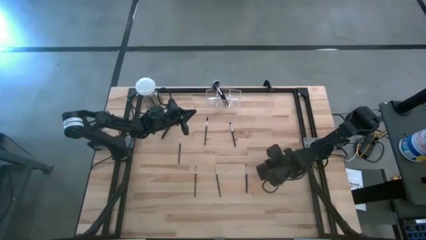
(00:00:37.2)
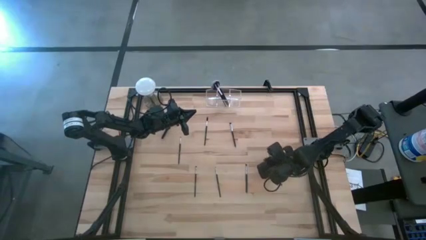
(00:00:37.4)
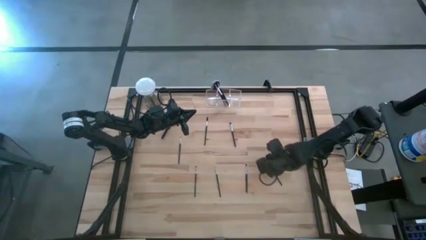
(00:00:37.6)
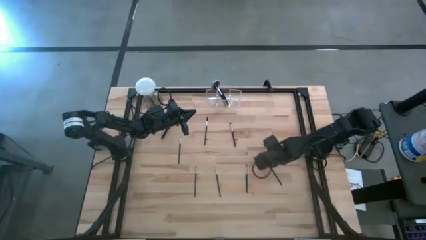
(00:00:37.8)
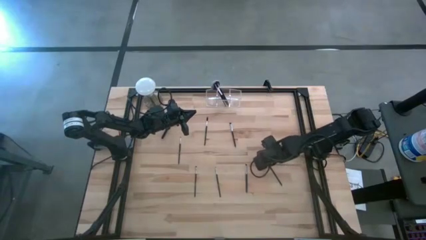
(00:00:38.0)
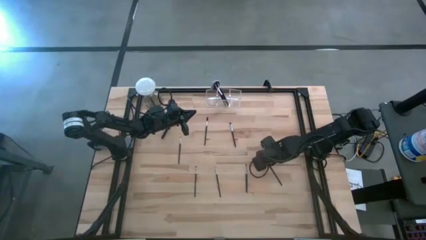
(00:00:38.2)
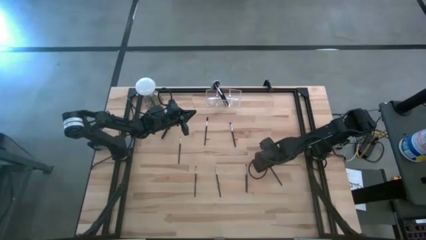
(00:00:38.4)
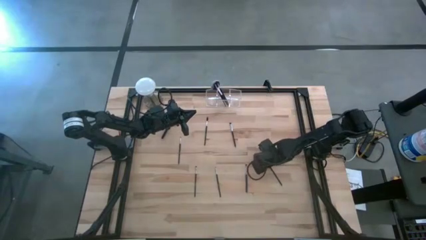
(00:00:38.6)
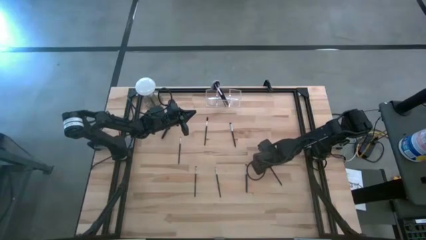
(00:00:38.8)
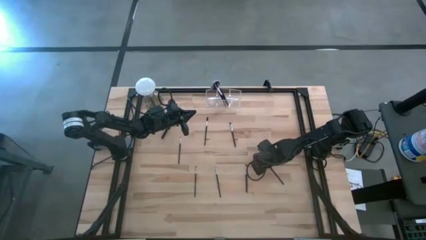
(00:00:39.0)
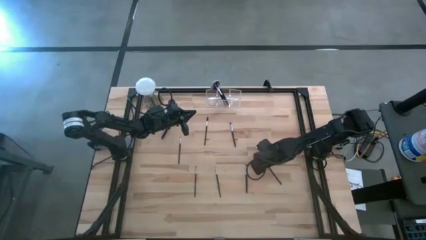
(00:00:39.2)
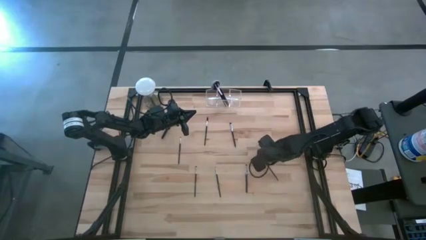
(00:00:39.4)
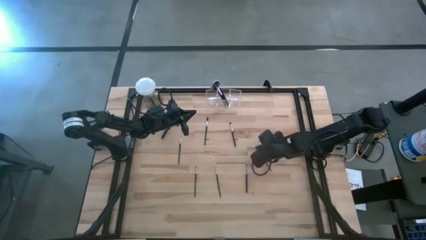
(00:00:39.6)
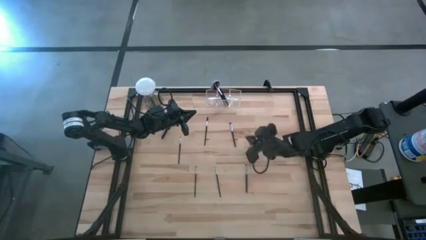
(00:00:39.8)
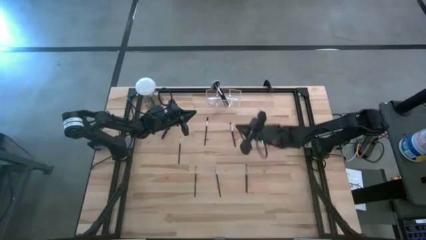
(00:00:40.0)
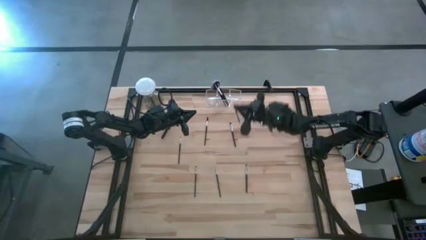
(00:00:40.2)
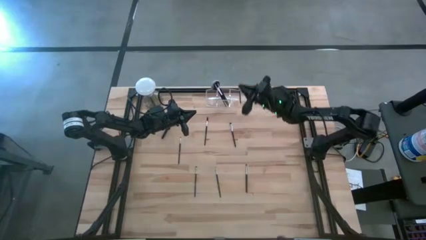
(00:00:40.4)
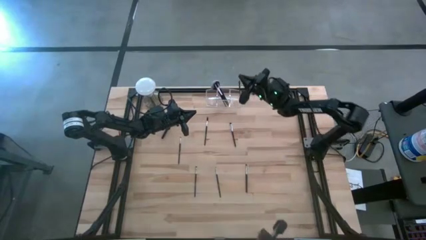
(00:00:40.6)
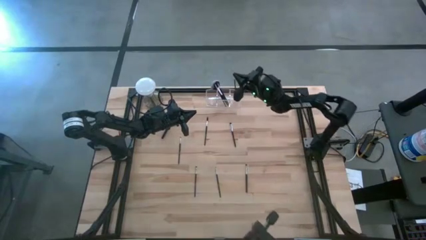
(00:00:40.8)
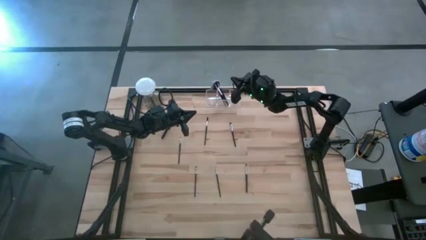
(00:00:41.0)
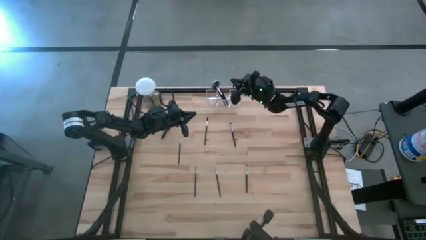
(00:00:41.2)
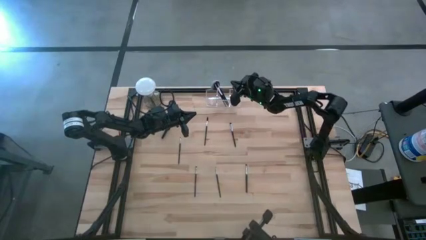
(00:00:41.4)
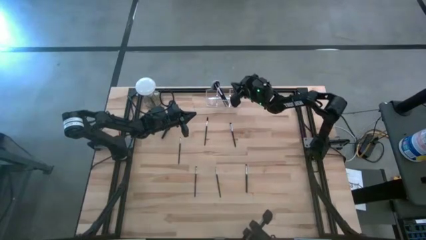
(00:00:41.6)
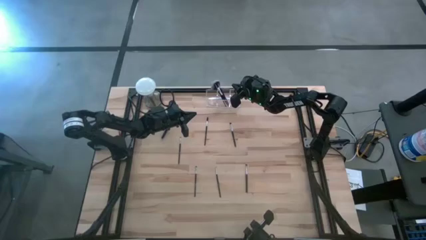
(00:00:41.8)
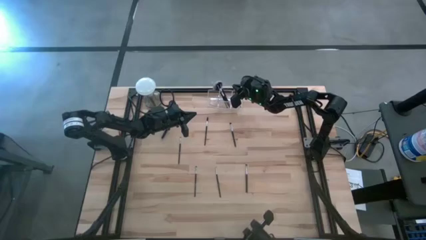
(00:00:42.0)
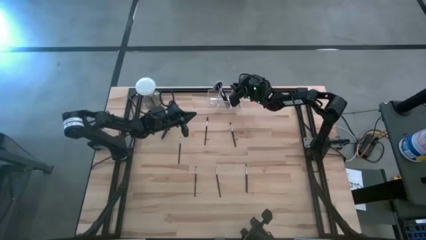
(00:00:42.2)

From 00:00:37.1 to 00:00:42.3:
Task: Pick & Place Makeup Brushes
Put the black eyeshadow brush into the transparent organizer

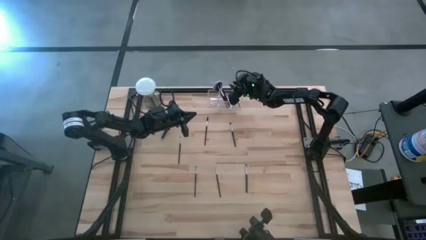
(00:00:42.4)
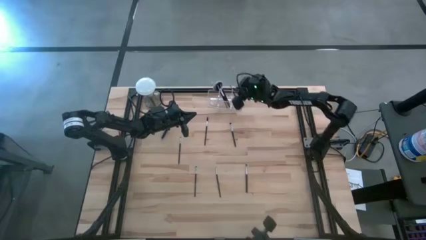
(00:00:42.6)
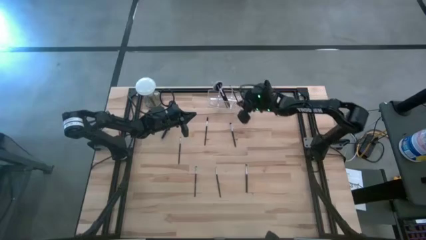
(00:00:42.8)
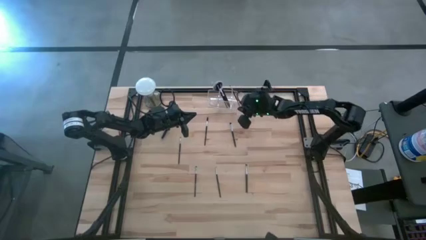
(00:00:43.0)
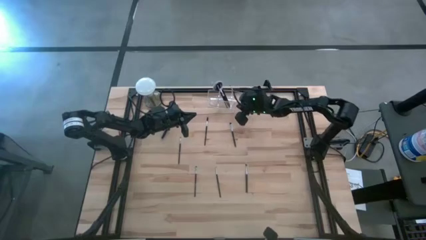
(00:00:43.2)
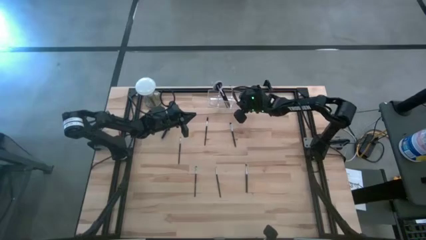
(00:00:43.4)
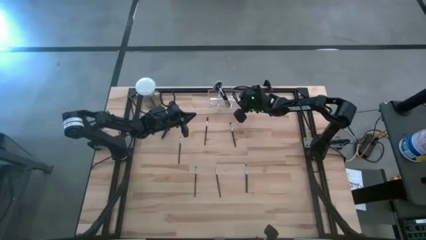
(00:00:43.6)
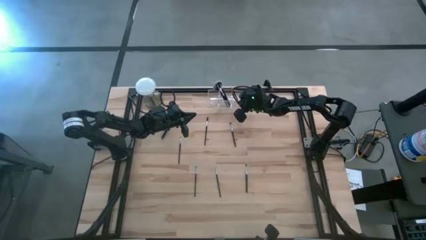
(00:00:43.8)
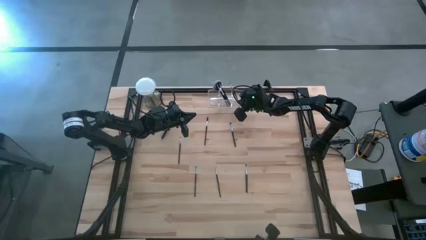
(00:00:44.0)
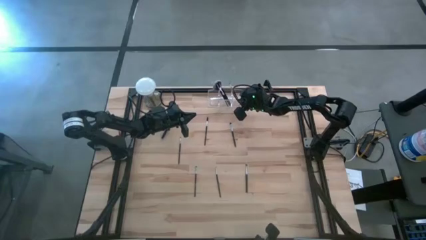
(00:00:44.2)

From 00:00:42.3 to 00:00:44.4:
Adjust the transparent organizer

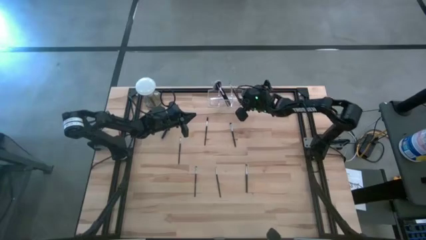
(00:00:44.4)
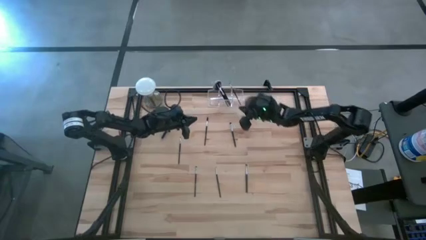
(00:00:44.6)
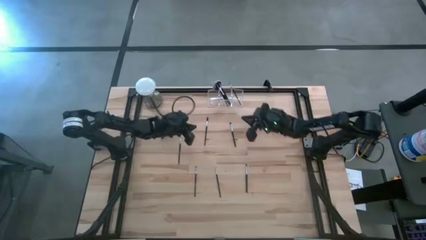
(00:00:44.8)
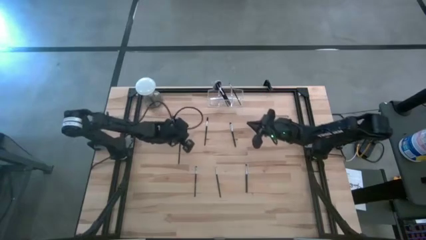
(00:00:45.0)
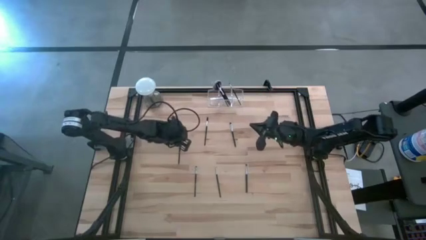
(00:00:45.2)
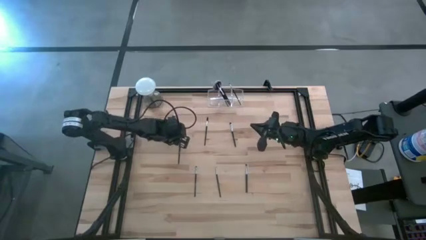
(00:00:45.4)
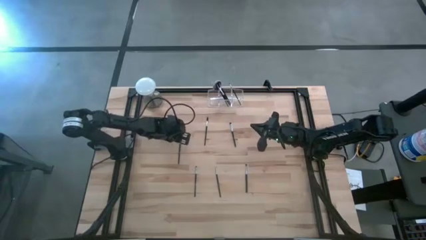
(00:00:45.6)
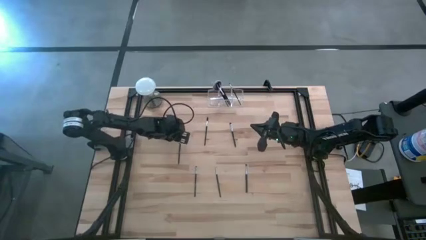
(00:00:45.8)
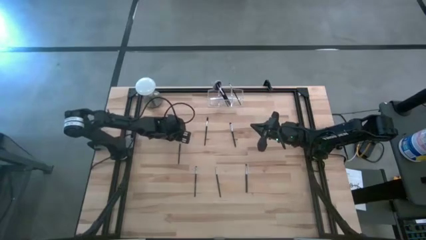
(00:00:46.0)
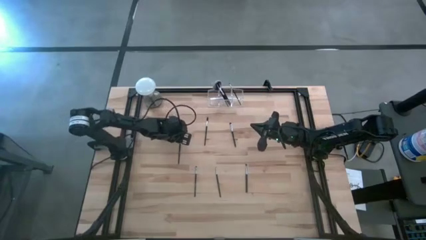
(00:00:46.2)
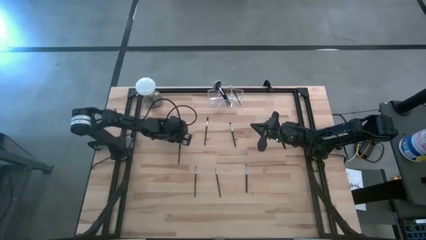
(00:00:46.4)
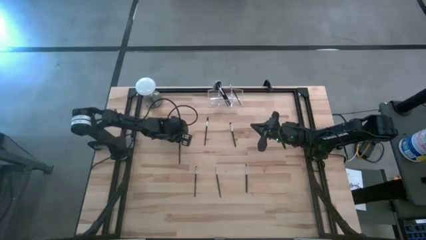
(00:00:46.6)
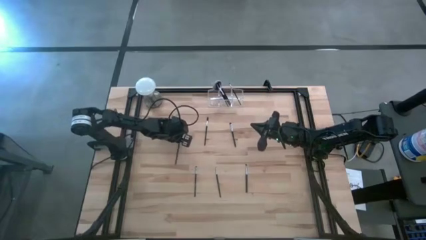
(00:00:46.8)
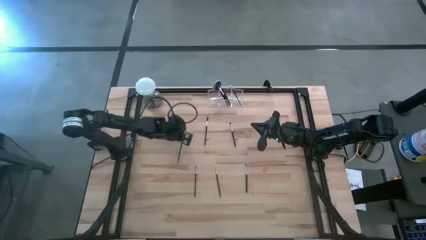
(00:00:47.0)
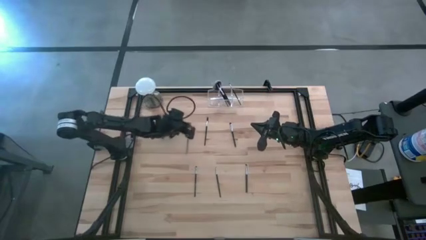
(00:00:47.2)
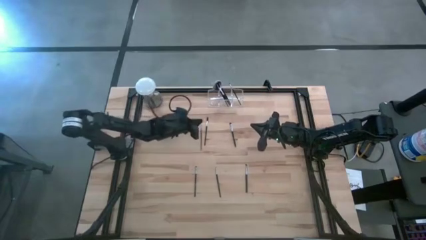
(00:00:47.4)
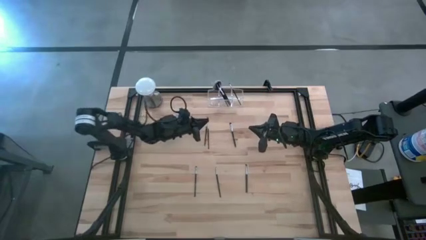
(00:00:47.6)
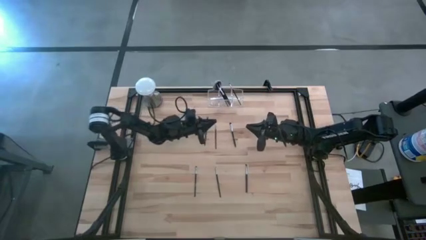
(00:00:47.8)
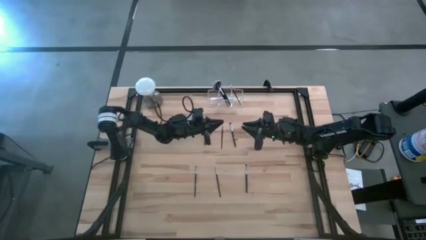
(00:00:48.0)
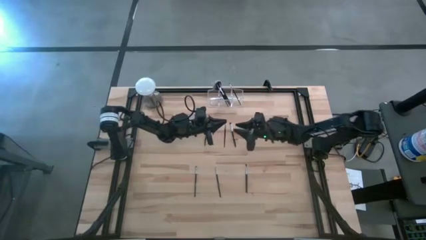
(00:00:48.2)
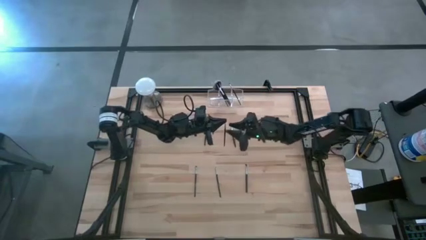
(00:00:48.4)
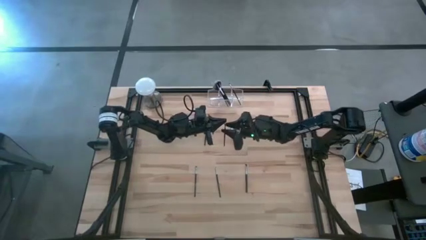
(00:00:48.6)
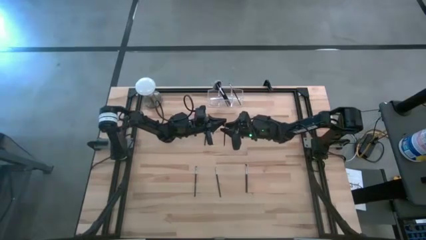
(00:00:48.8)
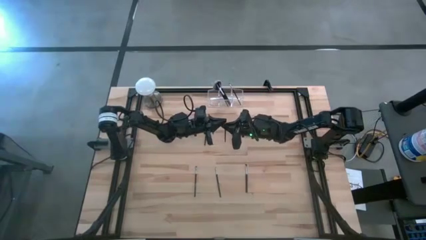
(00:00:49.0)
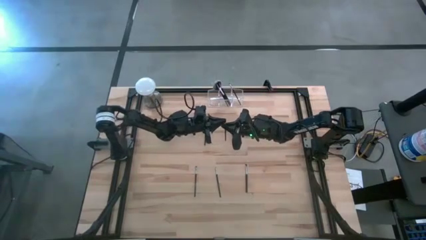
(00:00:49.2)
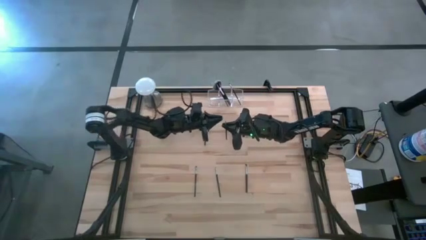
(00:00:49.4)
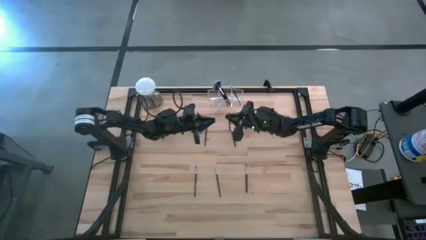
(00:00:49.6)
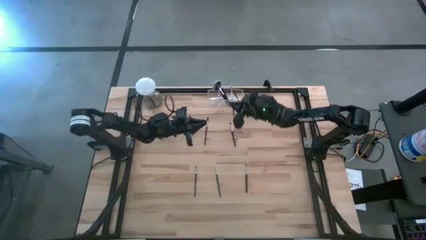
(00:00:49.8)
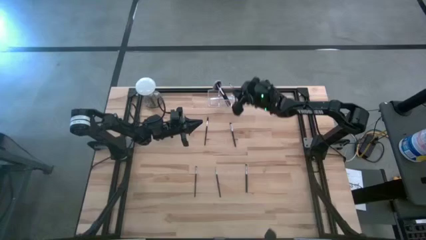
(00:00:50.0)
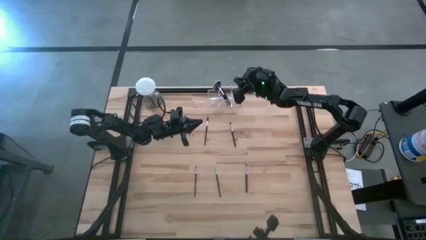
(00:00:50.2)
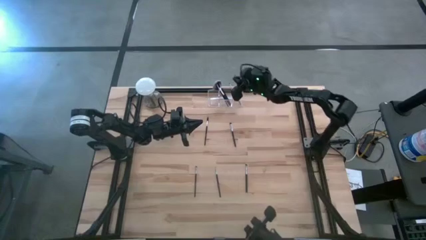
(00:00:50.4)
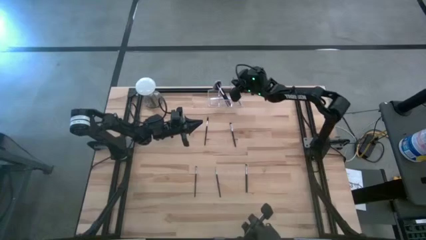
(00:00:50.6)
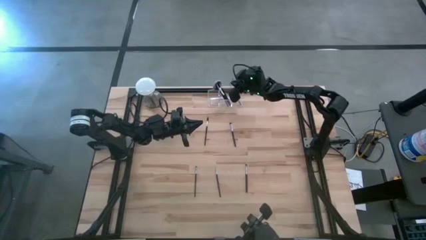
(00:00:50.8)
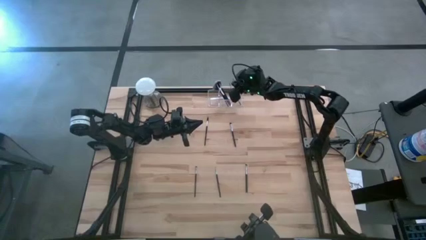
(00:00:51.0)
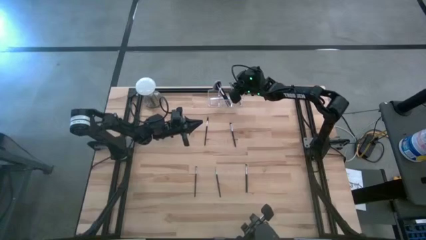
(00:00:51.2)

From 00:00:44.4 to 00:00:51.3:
Put the black eyeshadow brush into the transparent organizer

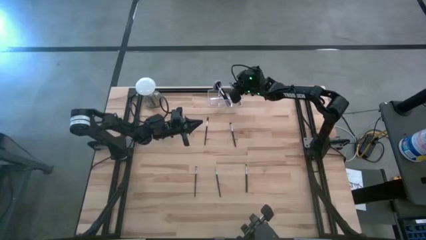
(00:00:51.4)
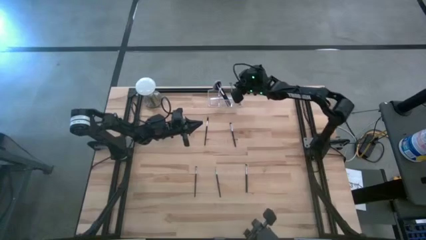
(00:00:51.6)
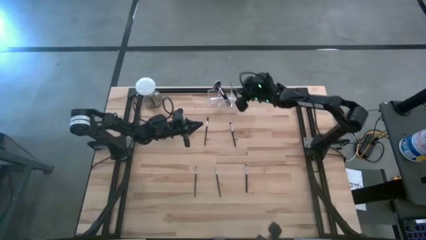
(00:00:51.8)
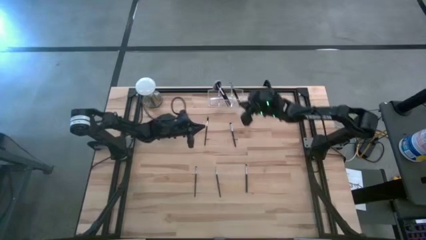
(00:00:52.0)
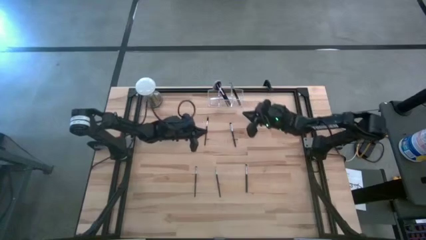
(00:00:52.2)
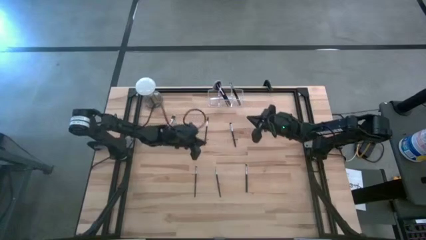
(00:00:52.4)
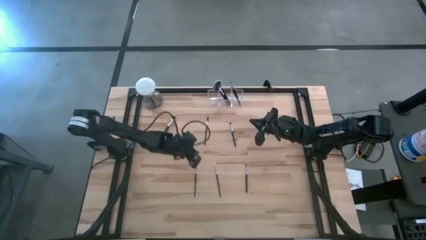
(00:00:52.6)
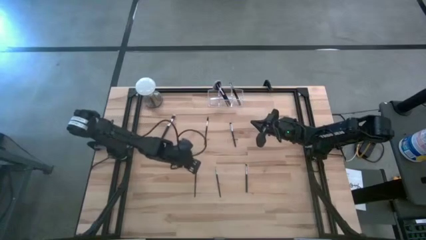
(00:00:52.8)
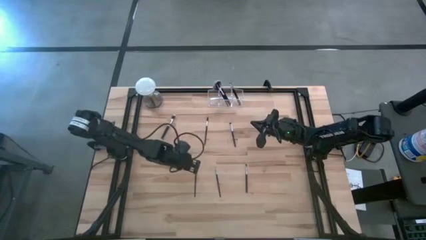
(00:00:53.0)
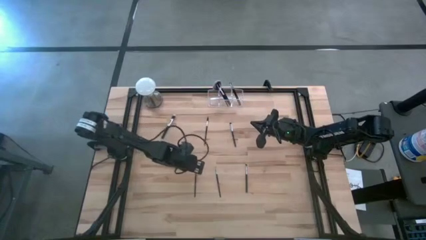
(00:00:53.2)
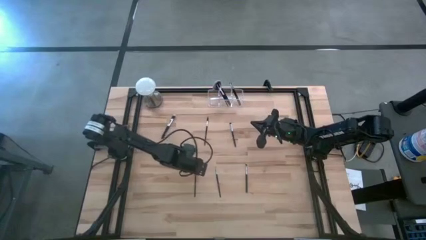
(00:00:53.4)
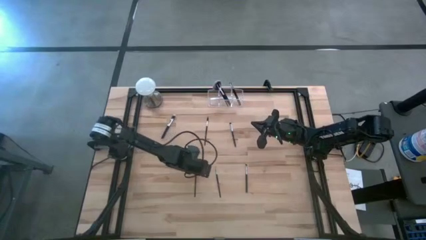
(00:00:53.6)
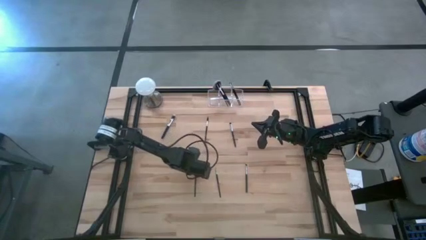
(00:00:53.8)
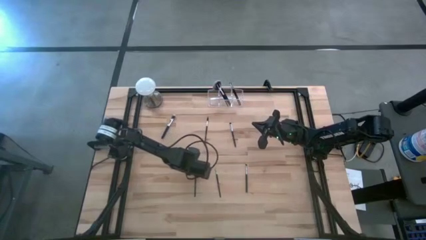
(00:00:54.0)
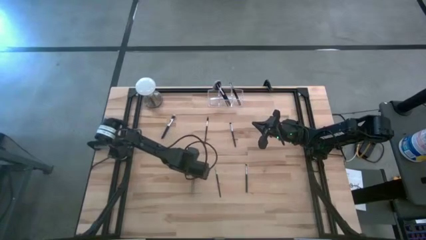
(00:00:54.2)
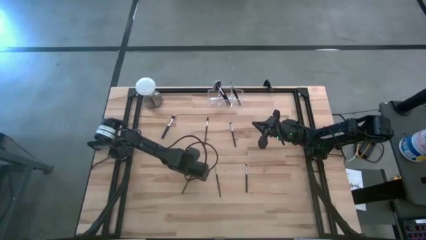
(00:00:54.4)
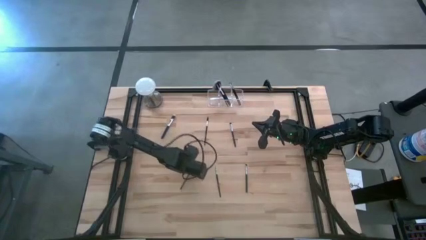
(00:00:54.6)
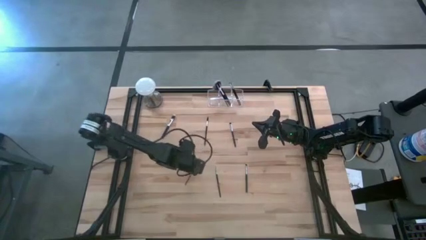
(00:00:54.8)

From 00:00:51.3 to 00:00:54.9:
Put the black eyeshadow brush into the transparent organizer
